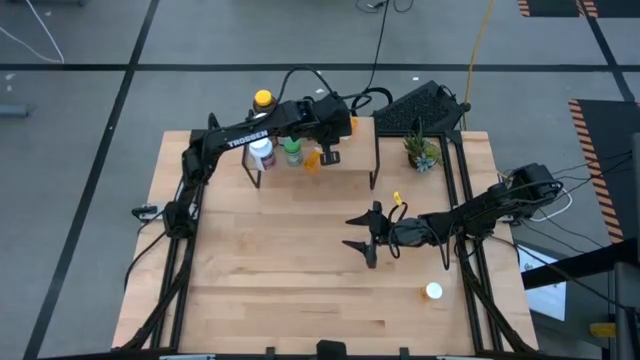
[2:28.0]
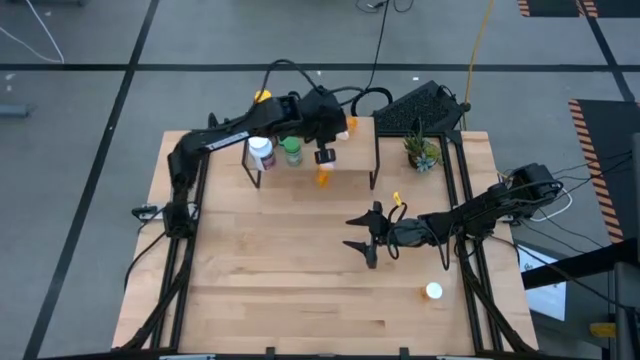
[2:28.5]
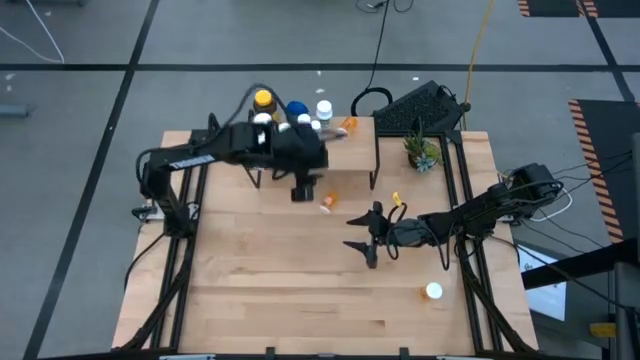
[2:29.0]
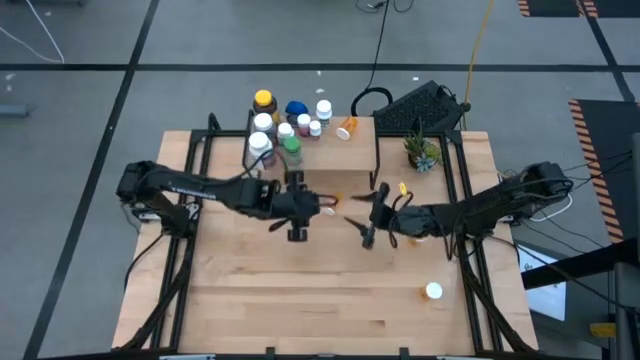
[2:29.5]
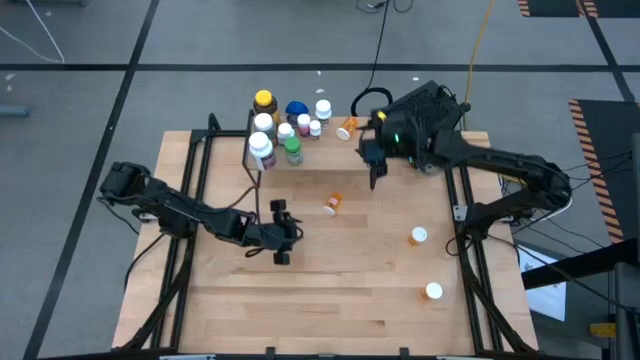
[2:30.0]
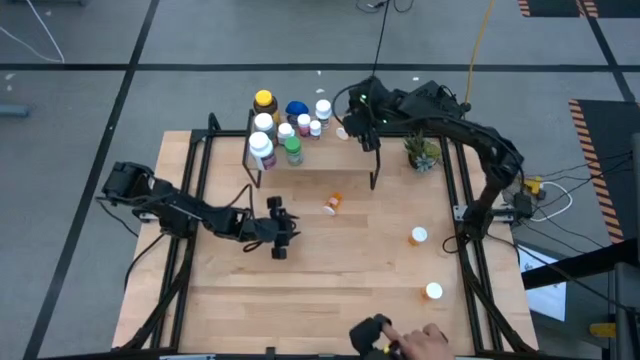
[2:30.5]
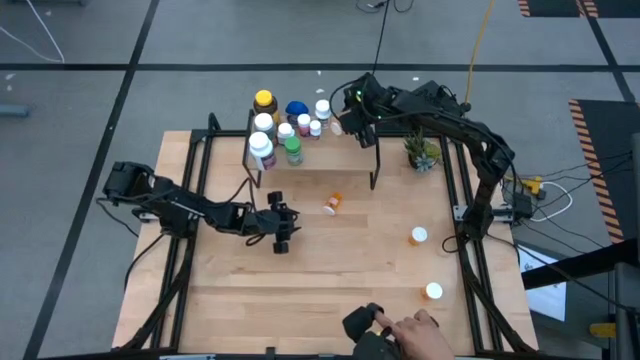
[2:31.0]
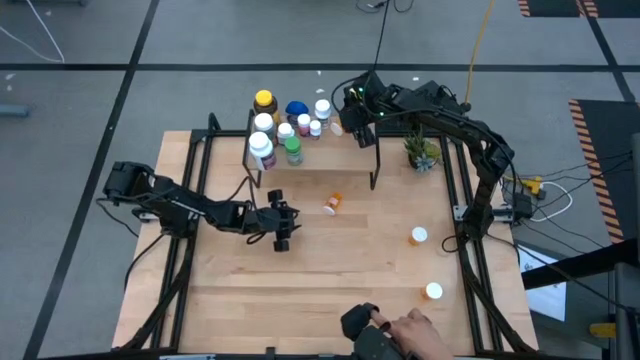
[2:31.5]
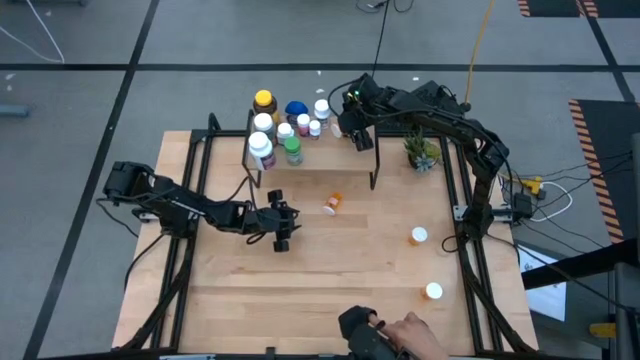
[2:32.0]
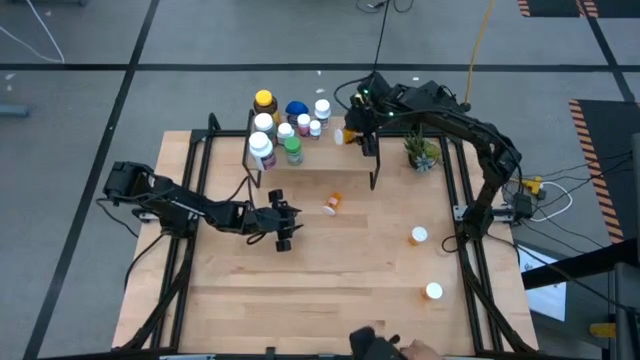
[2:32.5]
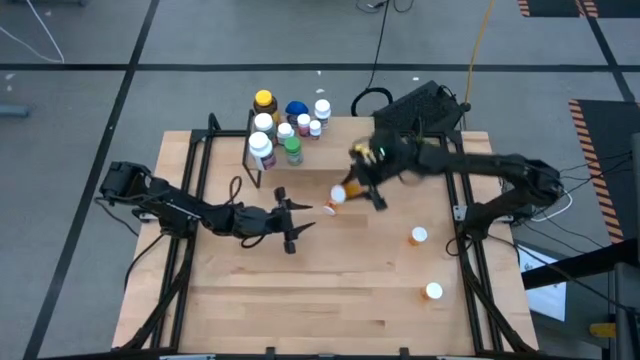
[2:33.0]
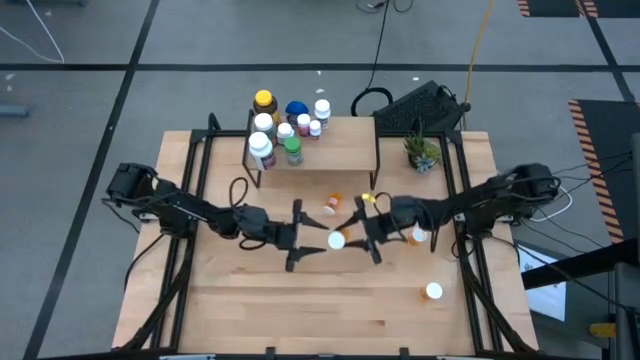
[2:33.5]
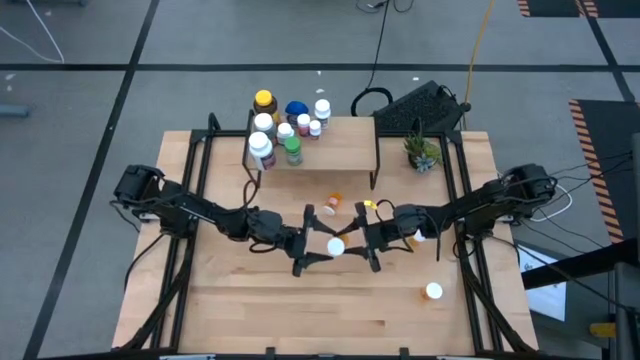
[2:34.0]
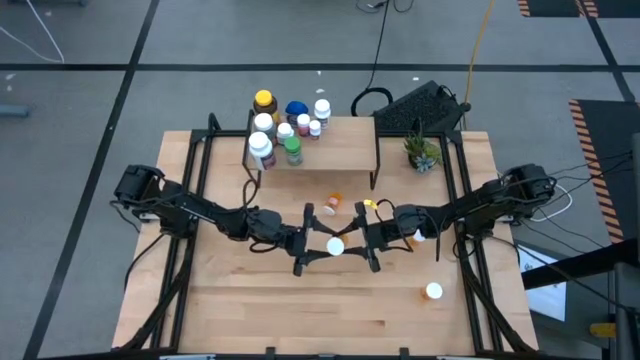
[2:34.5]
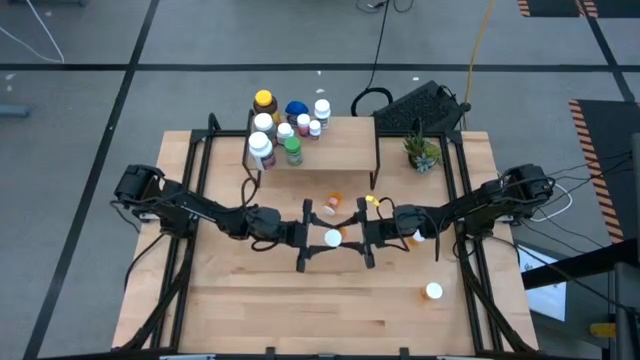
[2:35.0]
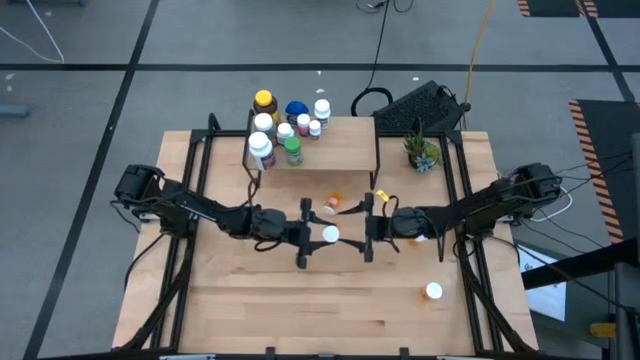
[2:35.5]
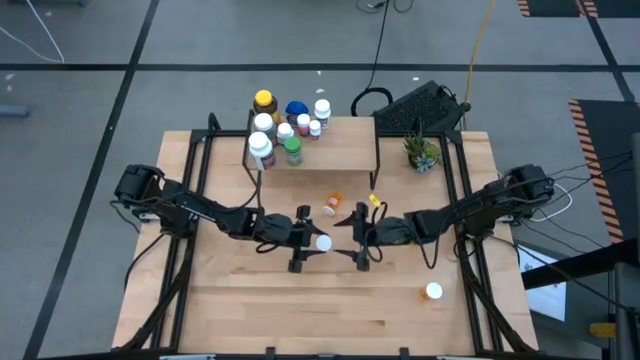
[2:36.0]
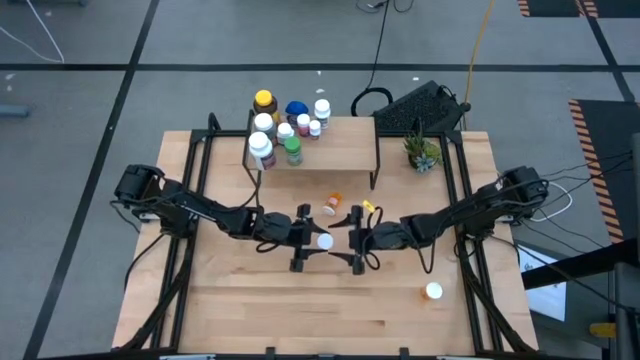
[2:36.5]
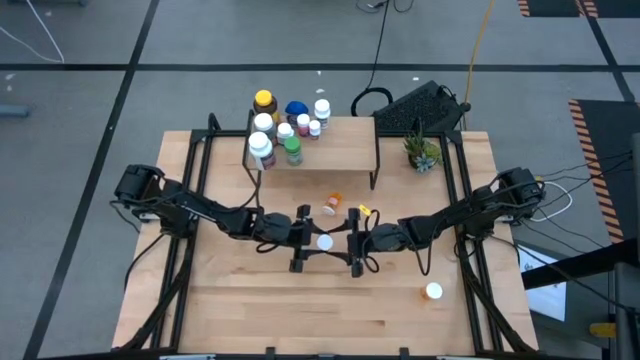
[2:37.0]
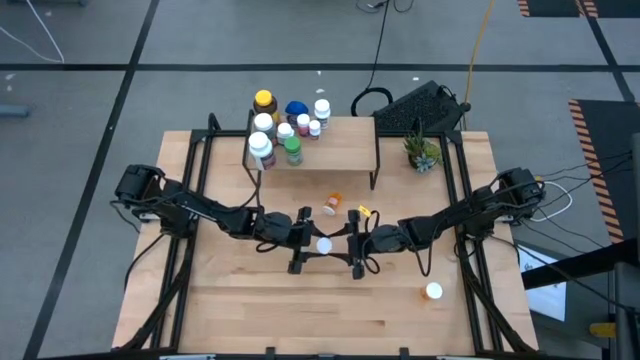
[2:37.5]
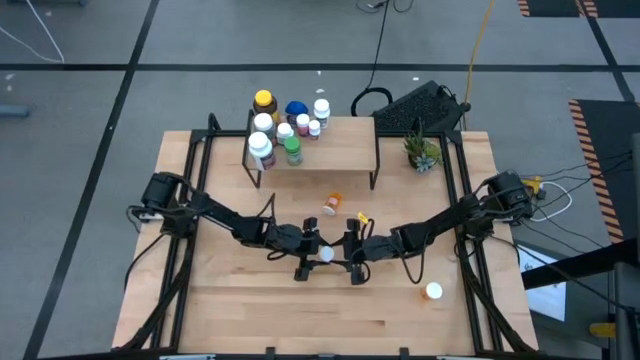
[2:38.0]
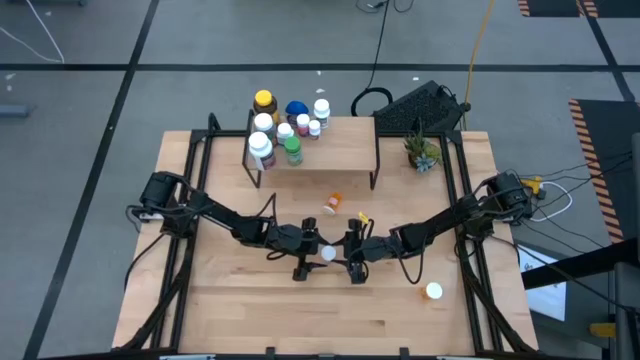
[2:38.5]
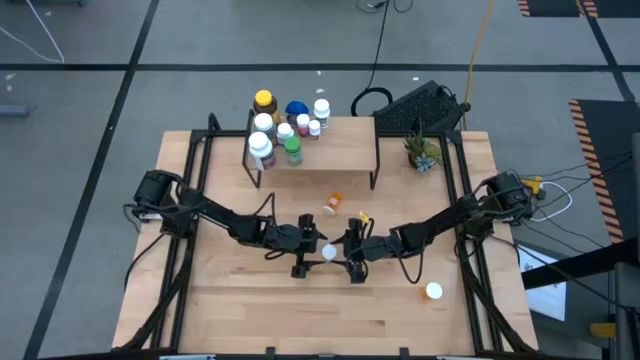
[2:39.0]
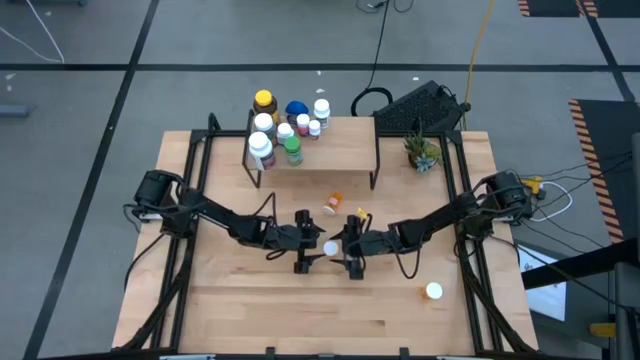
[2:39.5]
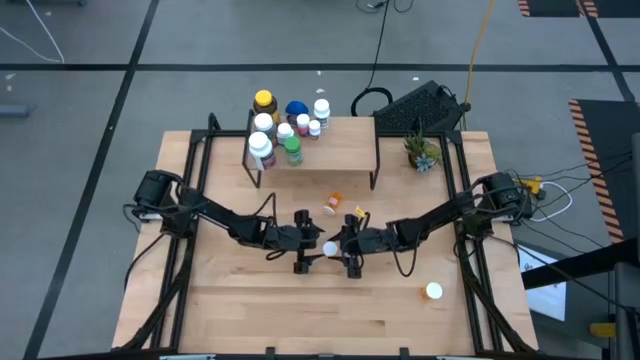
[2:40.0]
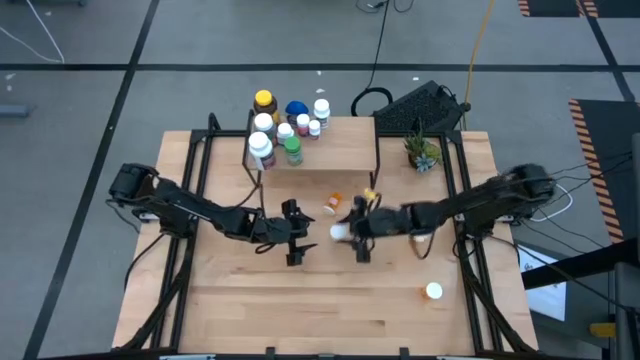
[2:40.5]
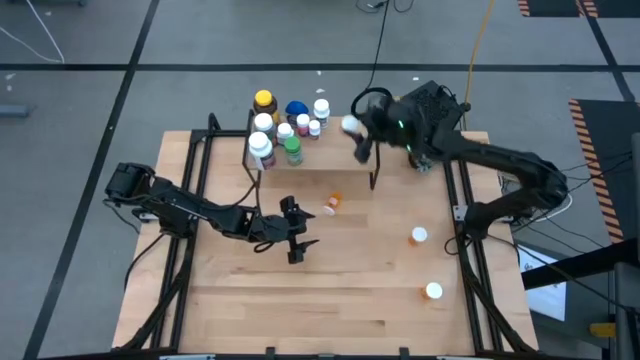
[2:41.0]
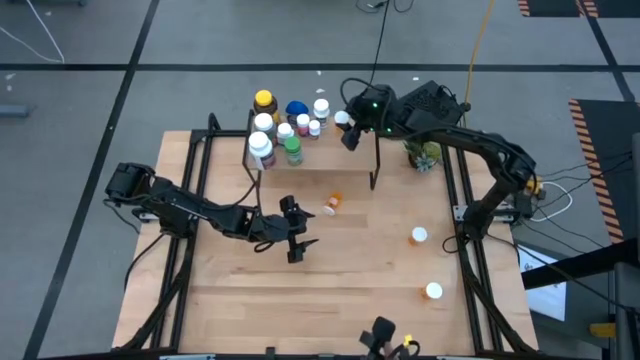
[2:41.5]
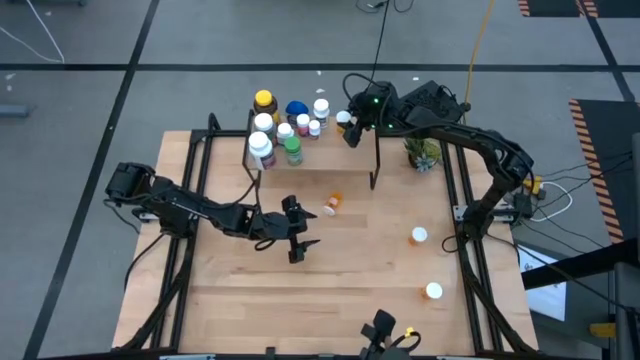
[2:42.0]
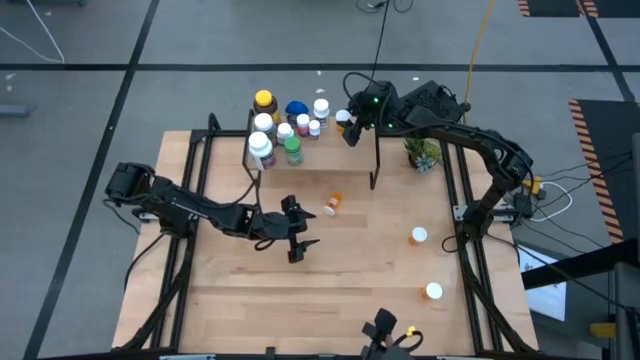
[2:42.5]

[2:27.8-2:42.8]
Task: Pick and place medicine bottles onto shelf by color
Adjust the orange pill bottle on the shelf

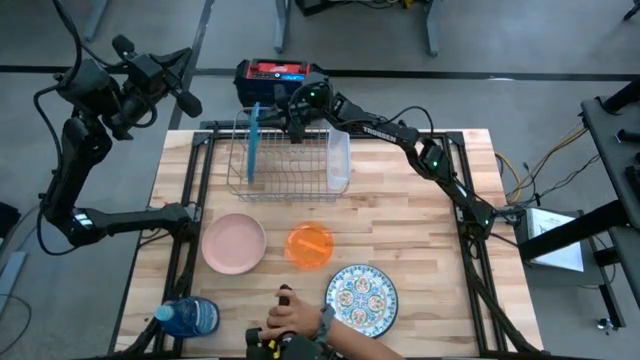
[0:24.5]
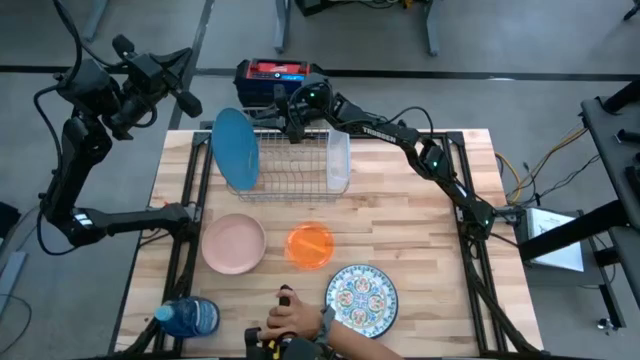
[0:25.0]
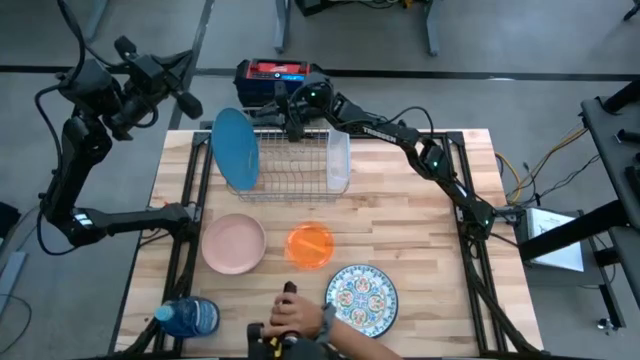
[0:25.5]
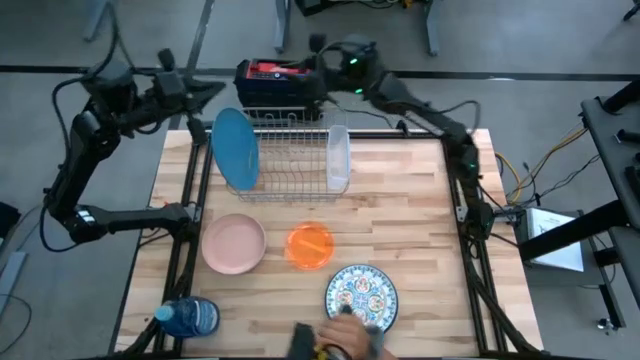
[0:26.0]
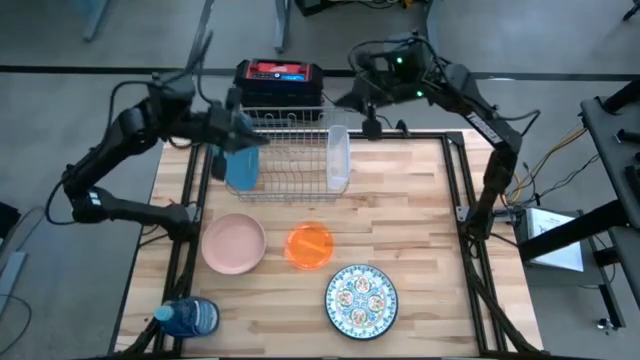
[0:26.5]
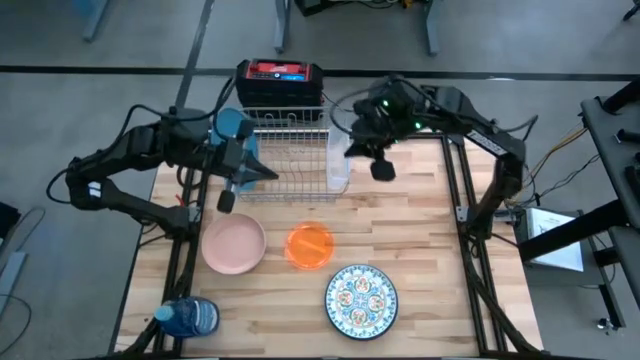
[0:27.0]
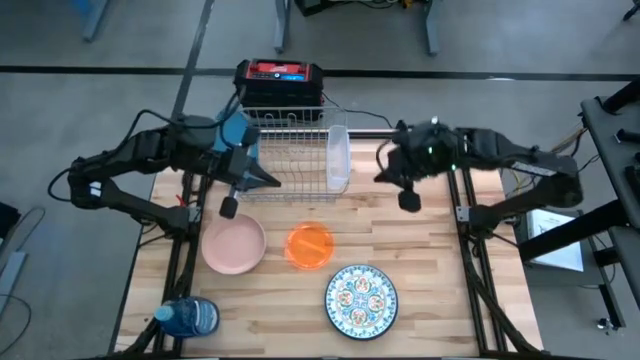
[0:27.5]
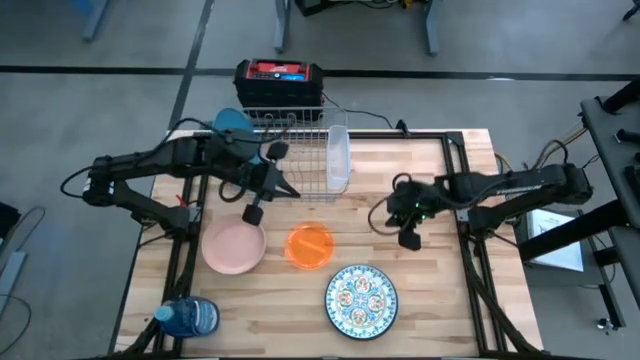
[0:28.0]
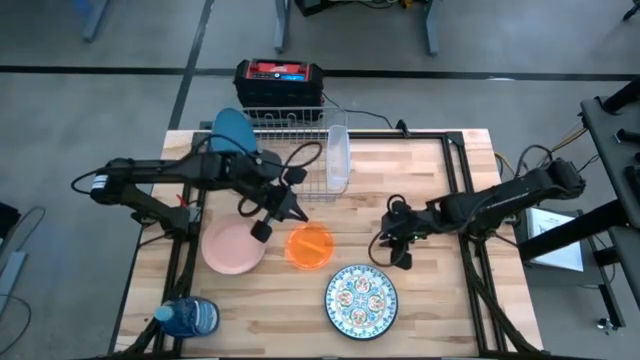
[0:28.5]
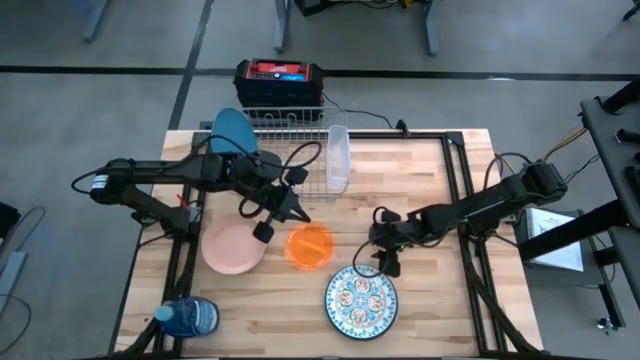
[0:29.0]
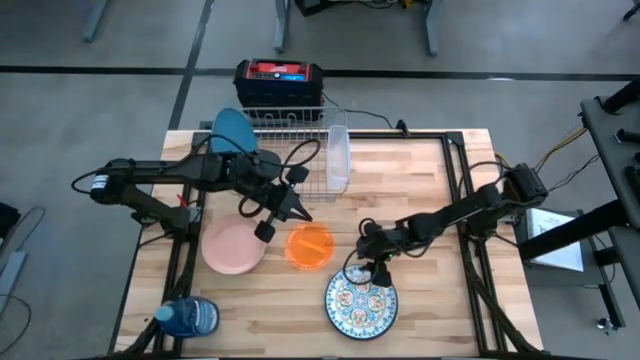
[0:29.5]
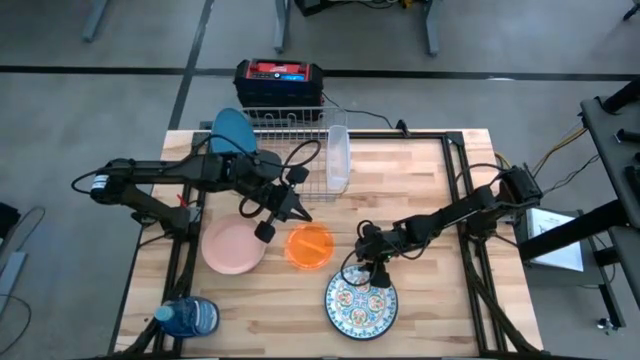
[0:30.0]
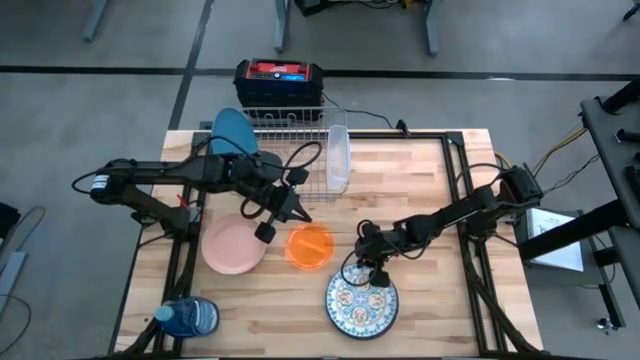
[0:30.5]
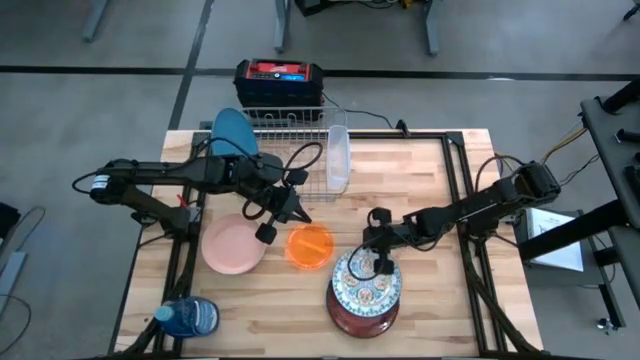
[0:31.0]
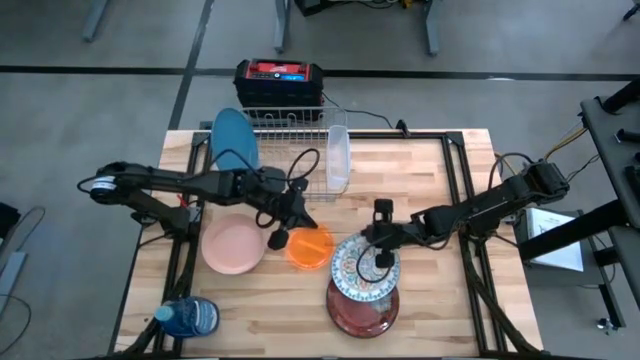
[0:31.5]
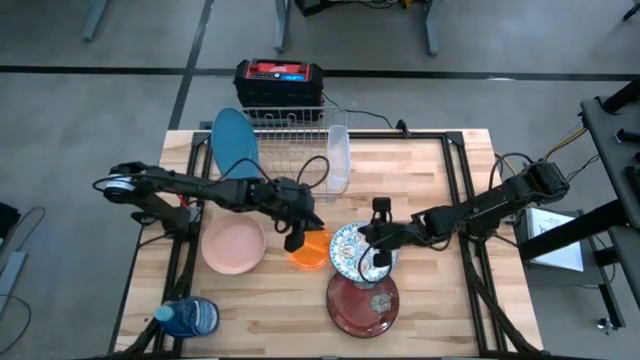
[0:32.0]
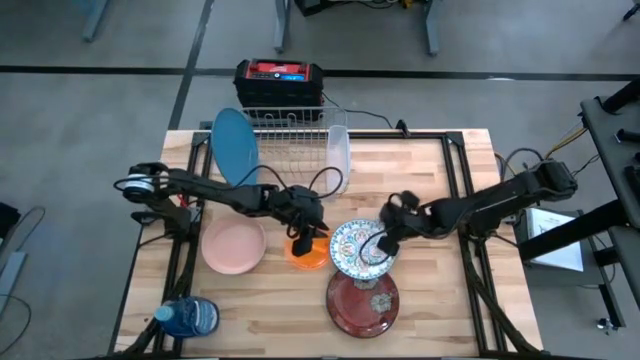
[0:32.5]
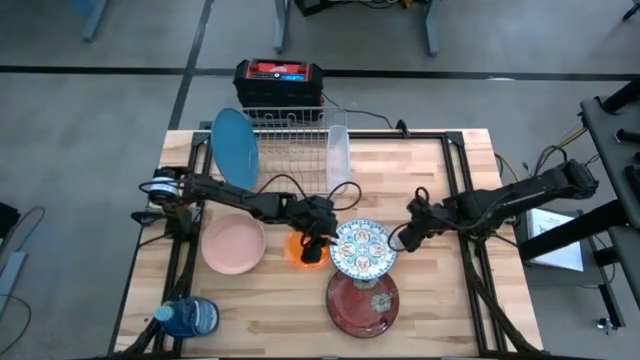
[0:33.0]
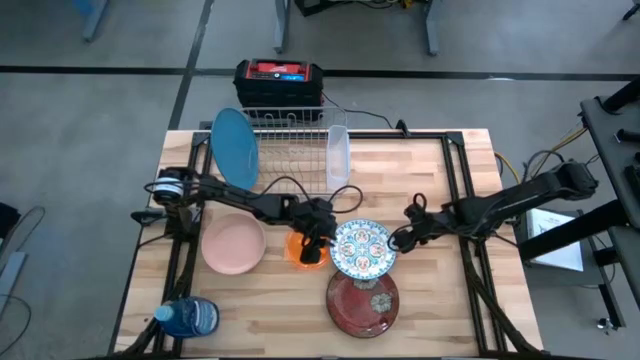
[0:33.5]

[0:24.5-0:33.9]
Task: Sort dishes
Put the white and blue plate in the dishwasher rack
